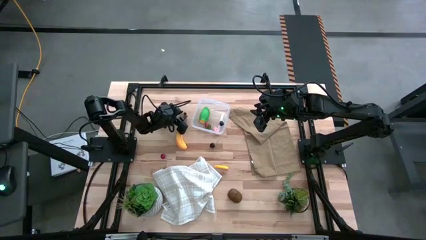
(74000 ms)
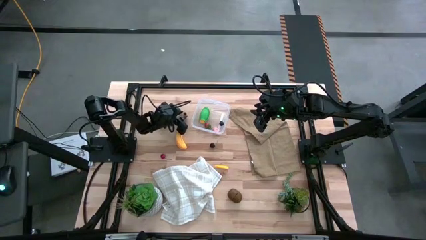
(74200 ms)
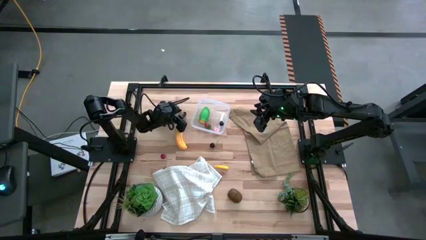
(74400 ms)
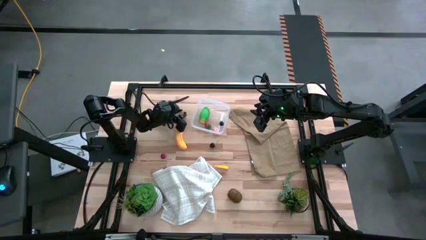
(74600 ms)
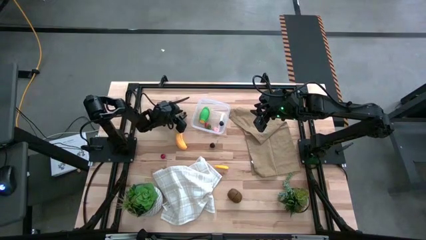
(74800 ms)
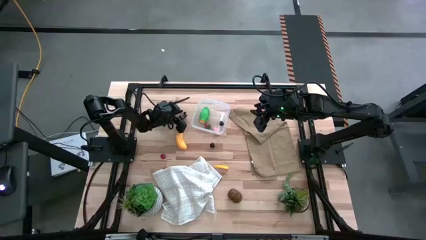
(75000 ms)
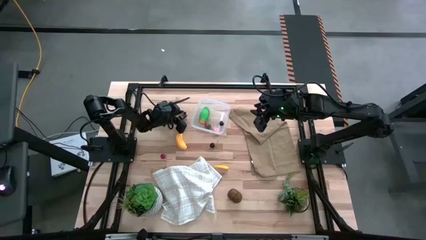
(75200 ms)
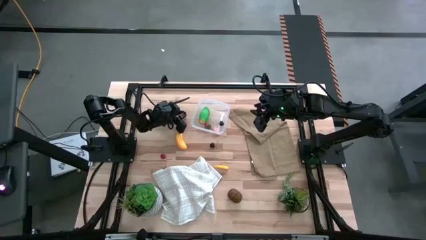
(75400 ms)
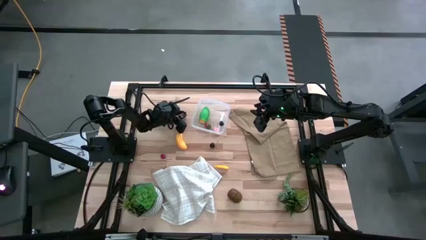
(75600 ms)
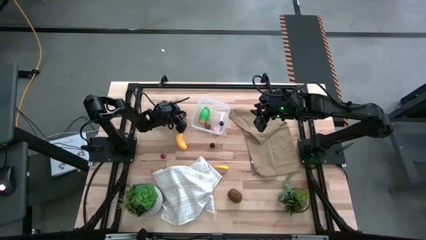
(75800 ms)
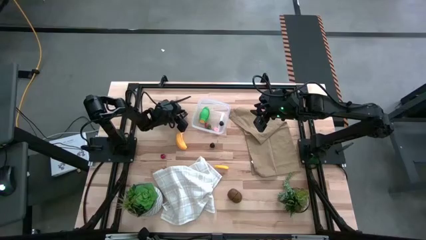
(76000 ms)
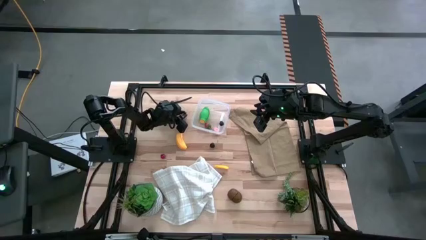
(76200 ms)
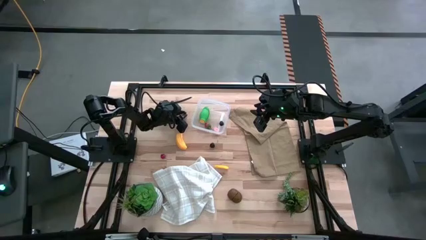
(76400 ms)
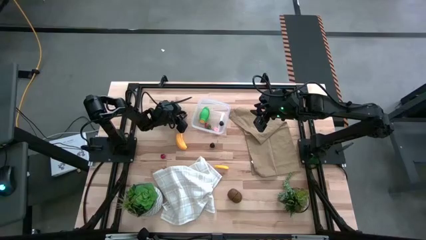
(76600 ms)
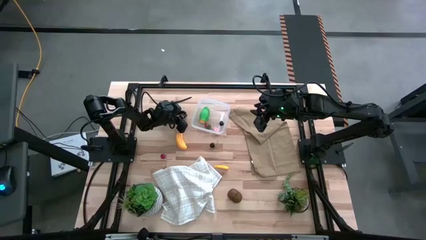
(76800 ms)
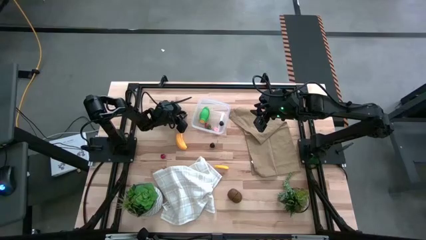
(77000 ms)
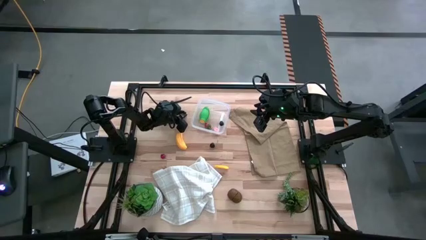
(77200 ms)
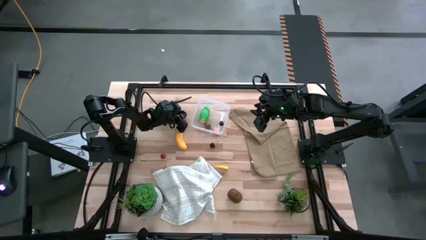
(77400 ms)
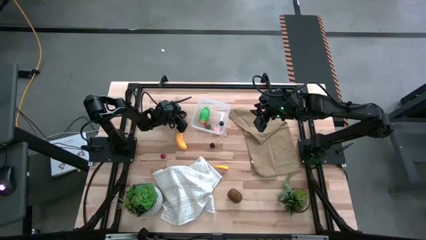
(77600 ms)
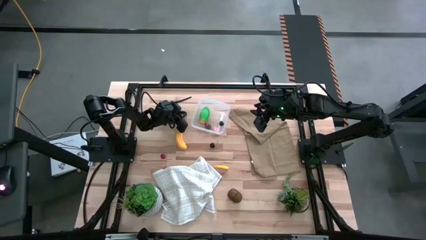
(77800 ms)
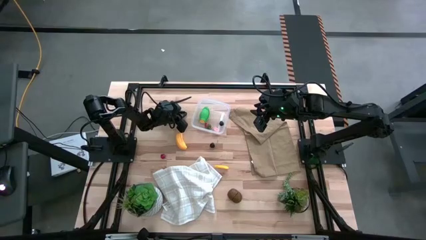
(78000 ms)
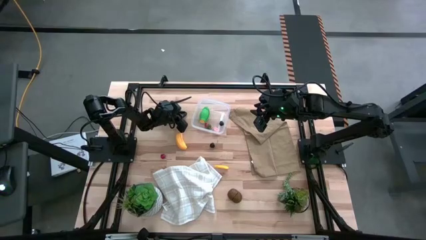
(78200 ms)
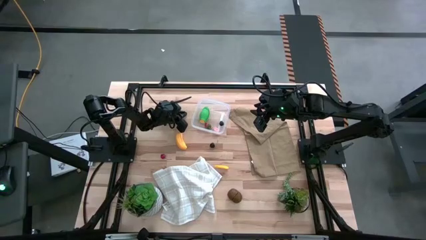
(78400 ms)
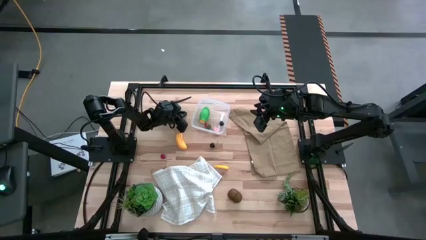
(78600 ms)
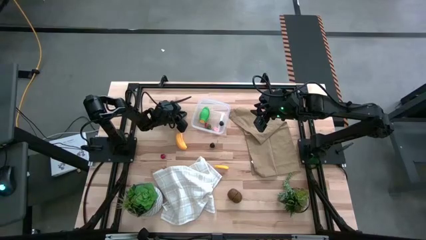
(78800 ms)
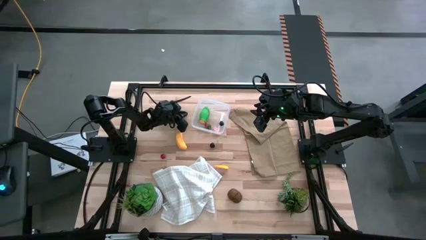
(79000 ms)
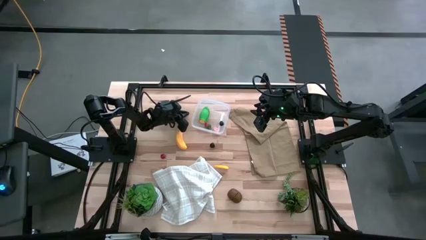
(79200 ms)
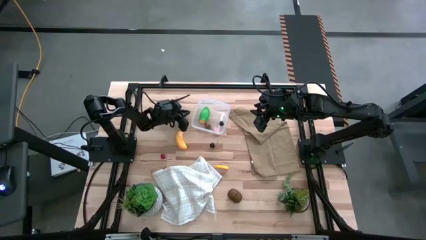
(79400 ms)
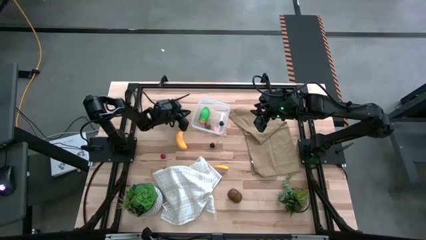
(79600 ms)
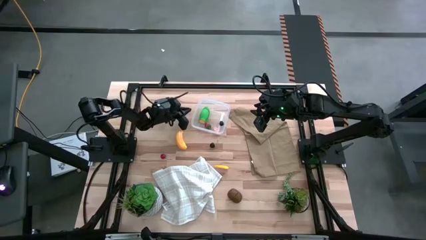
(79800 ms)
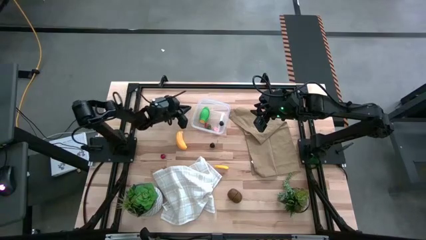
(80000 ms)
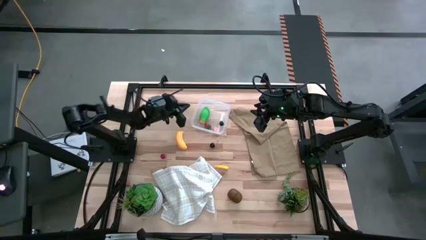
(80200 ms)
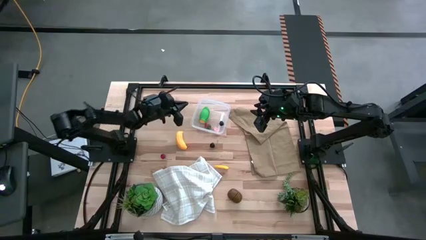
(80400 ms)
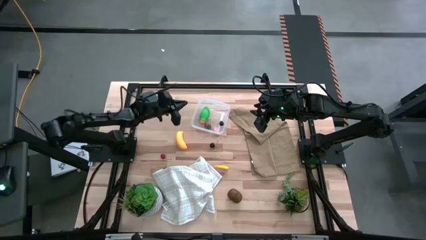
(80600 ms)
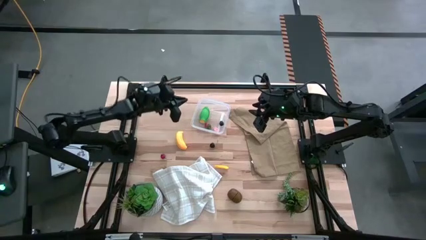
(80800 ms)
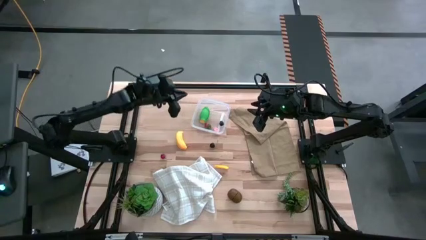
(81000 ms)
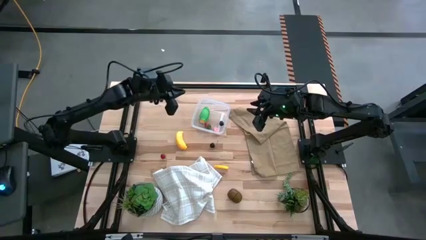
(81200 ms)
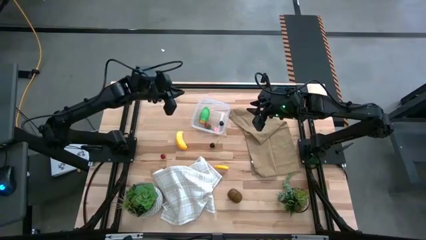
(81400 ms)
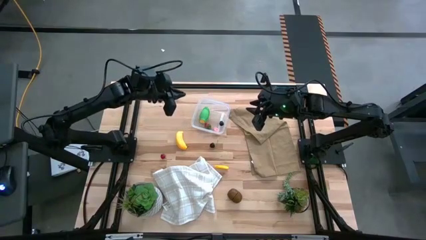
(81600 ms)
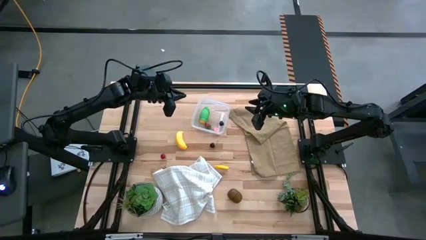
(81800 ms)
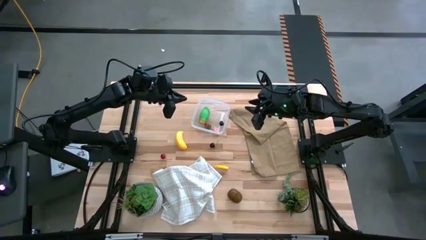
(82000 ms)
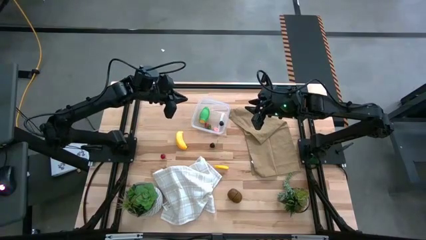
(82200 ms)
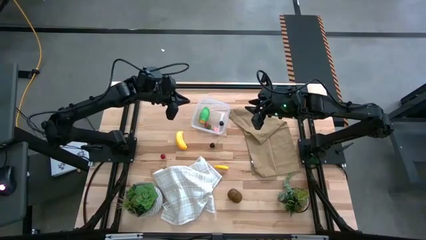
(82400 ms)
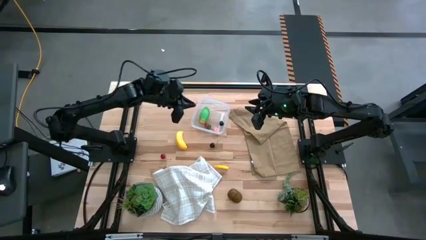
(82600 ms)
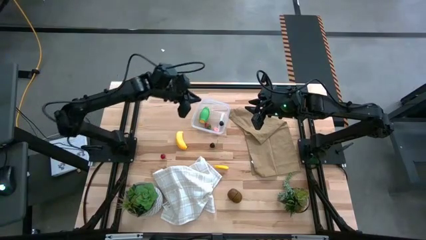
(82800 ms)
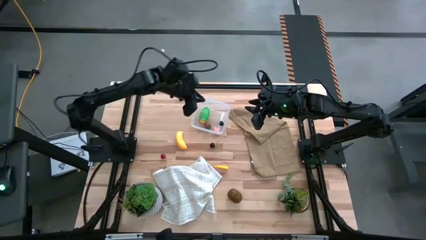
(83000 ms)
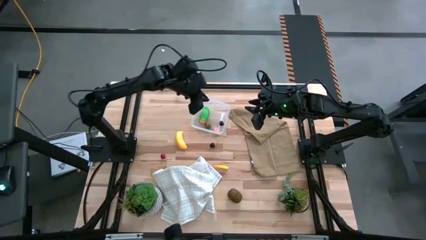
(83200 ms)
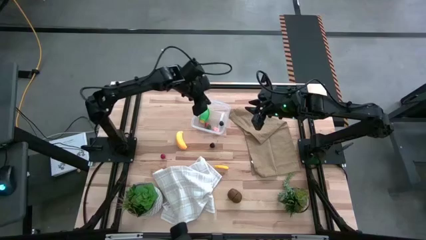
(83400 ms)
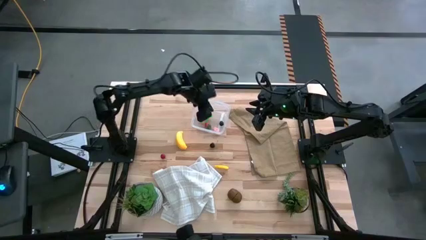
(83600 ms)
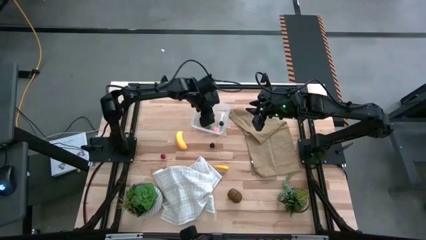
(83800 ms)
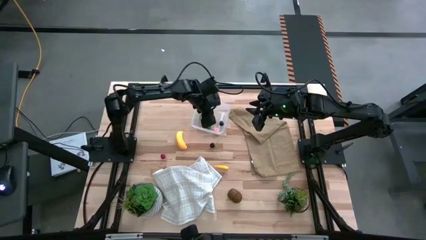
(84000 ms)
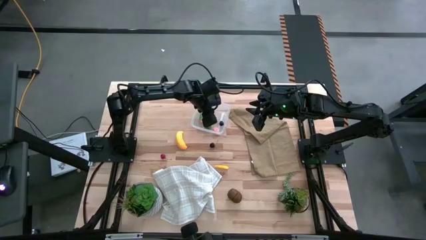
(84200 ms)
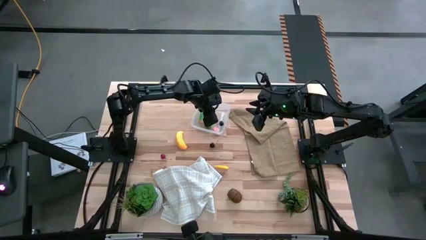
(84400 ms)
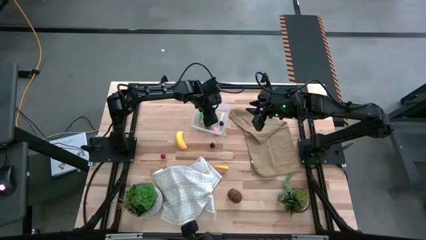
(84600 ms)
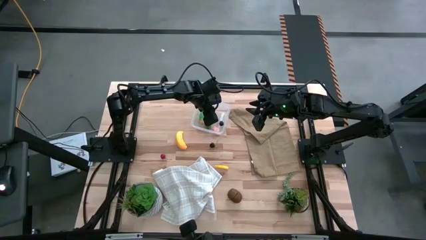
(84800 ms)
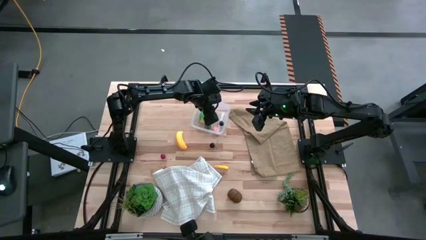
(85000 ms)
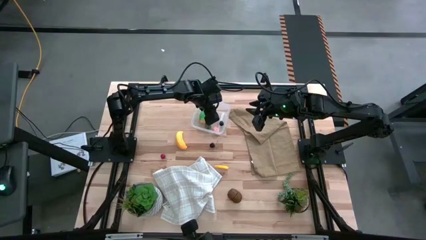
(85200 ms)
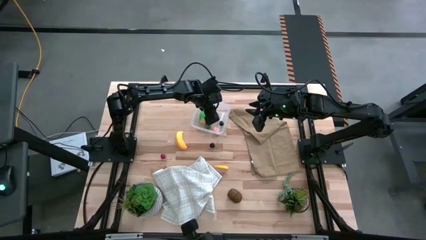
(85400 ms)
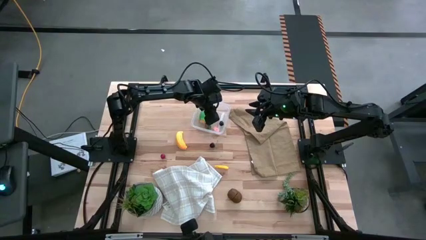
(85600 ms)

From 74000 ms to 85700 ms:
Task: Pick and placing Produce into tupperware
Put the blueberry into the transparent bin
